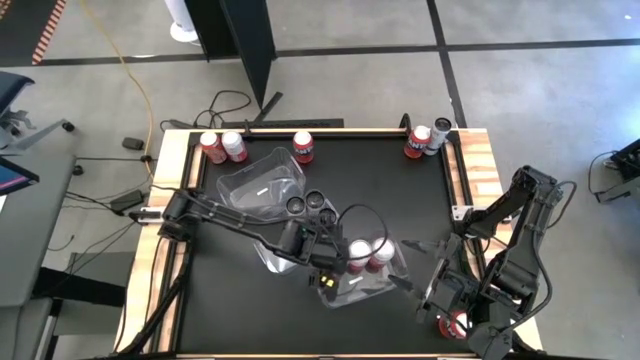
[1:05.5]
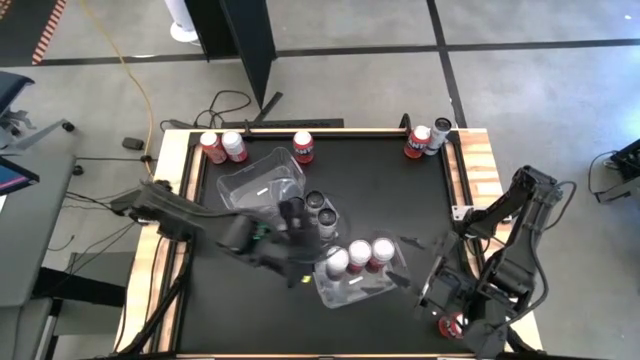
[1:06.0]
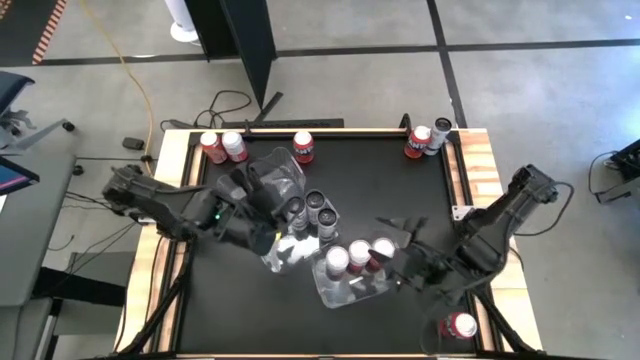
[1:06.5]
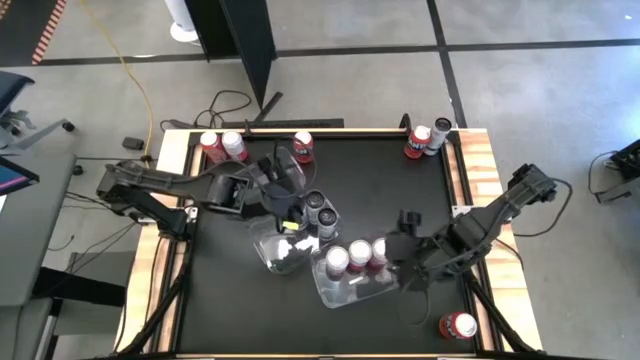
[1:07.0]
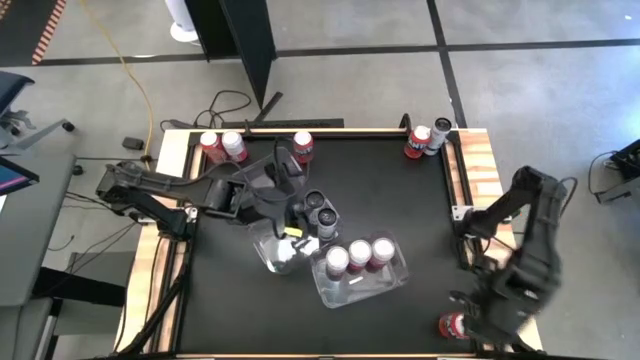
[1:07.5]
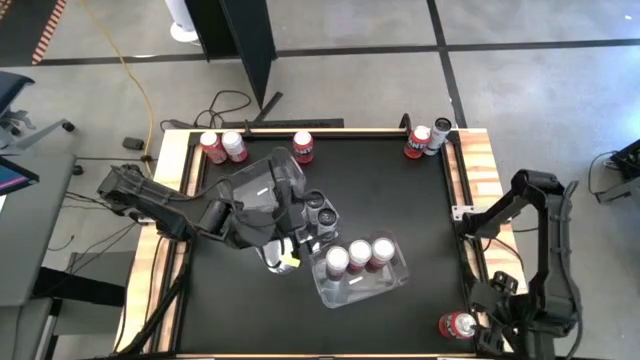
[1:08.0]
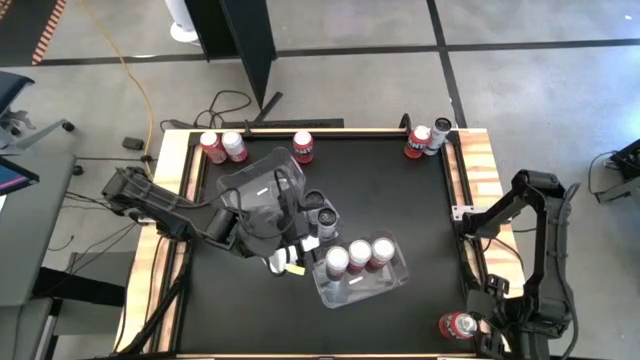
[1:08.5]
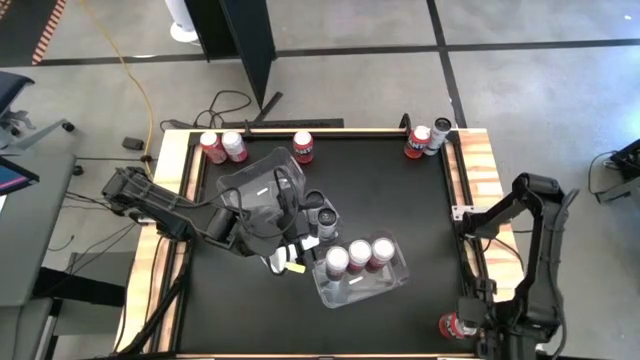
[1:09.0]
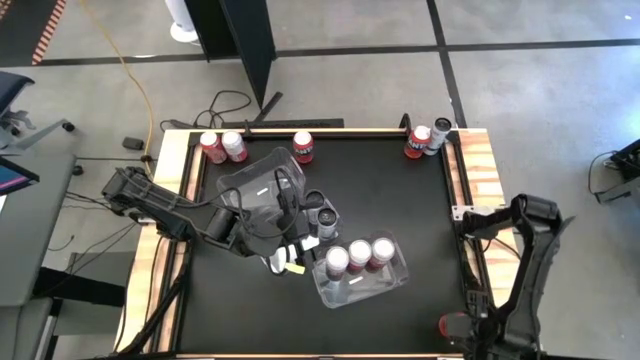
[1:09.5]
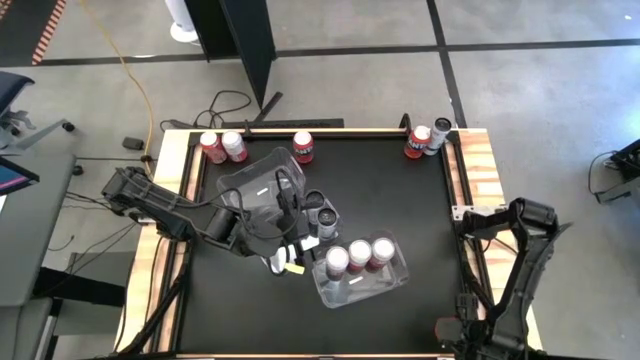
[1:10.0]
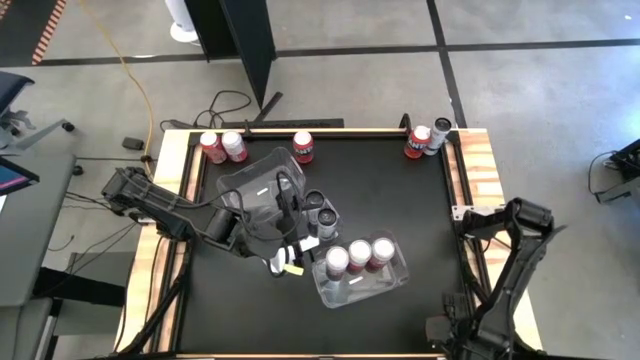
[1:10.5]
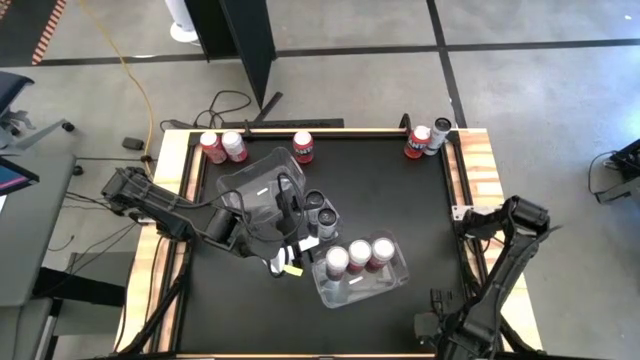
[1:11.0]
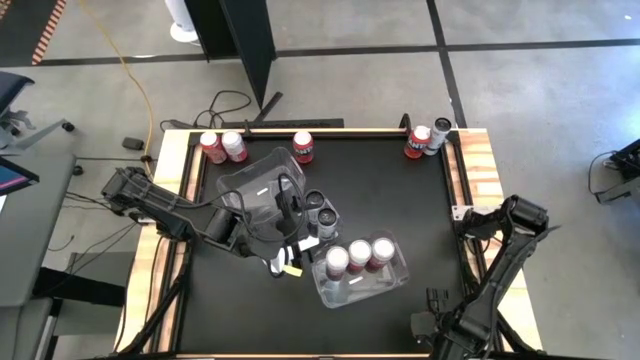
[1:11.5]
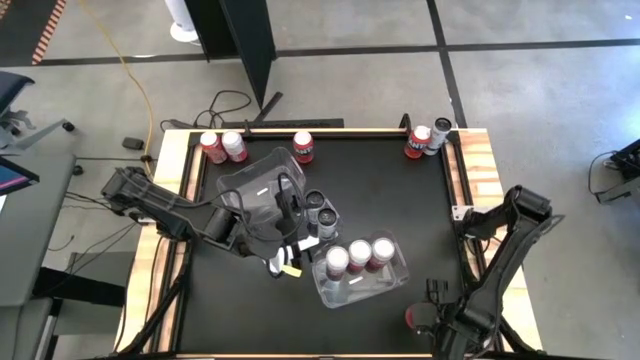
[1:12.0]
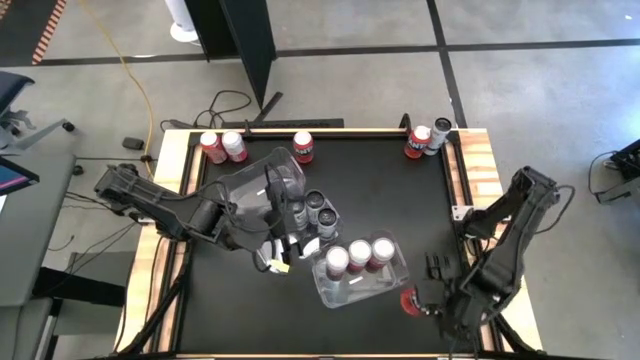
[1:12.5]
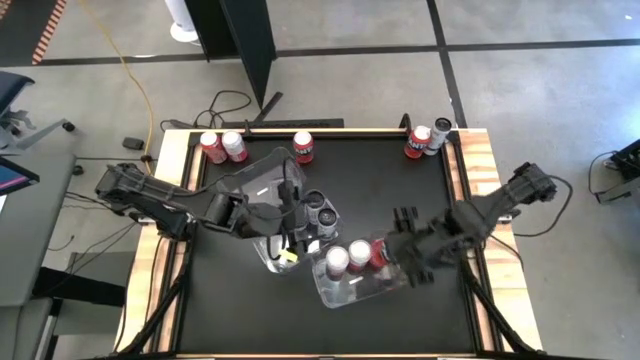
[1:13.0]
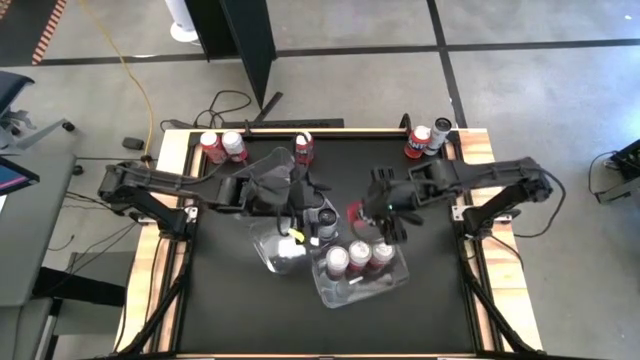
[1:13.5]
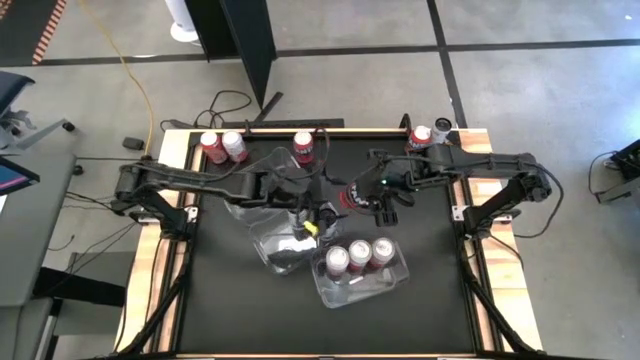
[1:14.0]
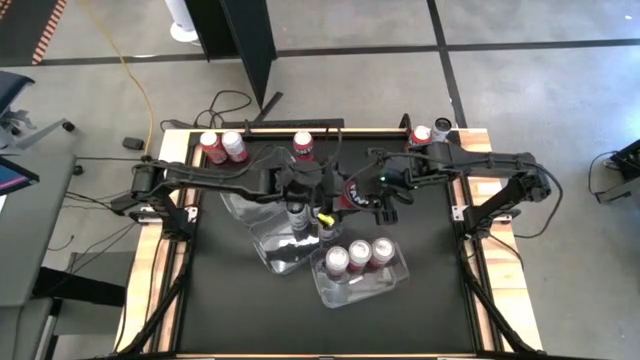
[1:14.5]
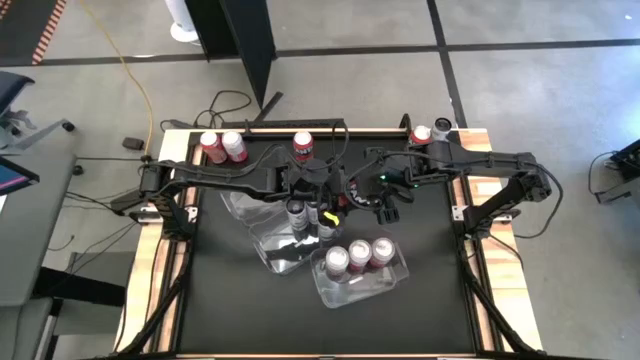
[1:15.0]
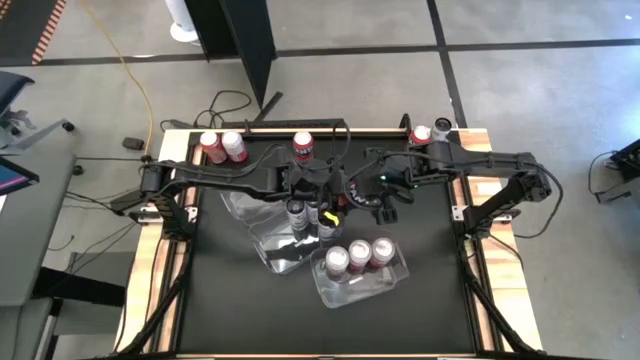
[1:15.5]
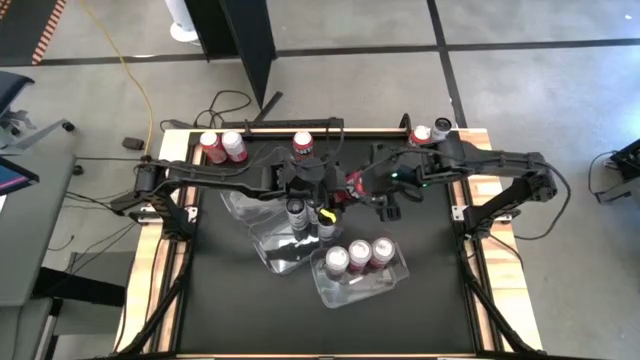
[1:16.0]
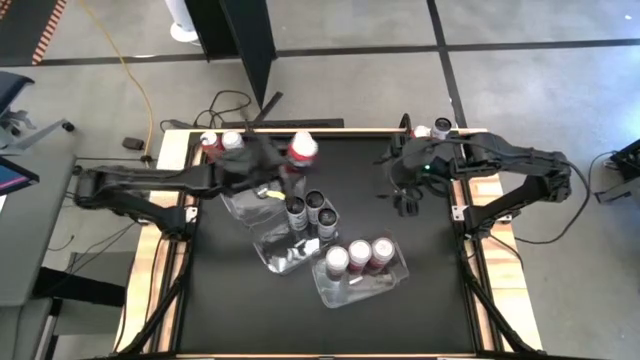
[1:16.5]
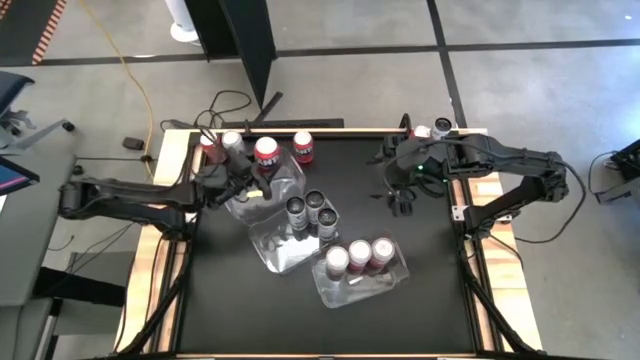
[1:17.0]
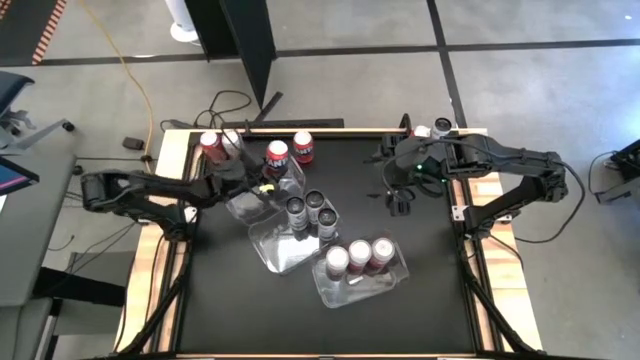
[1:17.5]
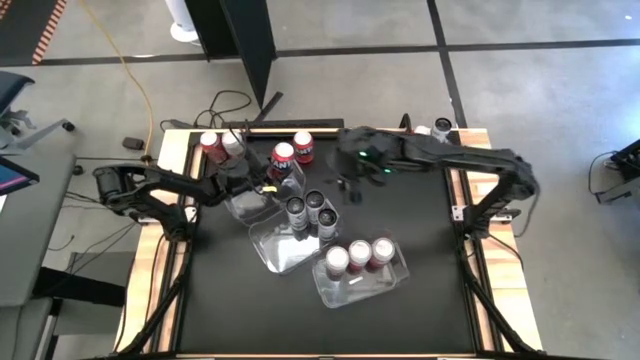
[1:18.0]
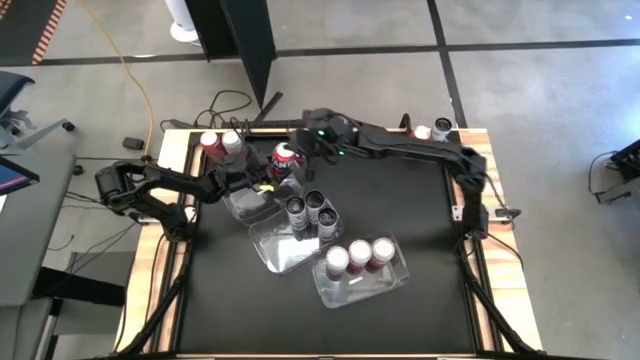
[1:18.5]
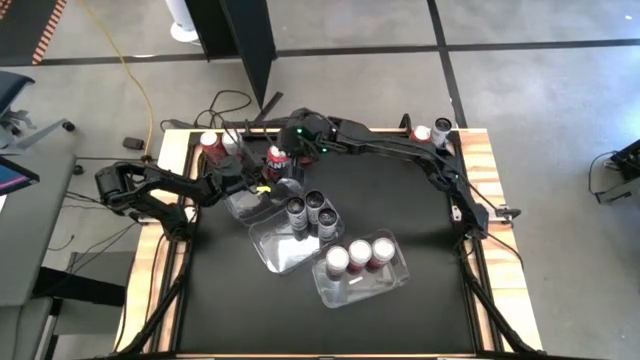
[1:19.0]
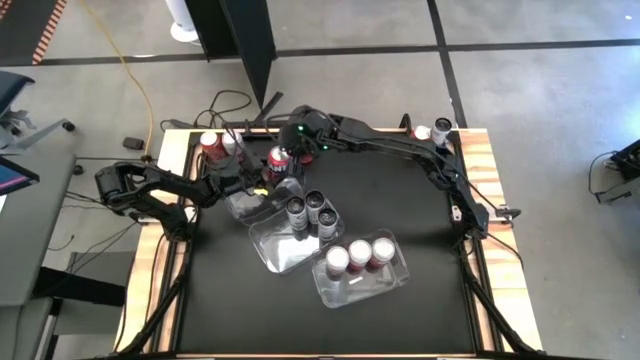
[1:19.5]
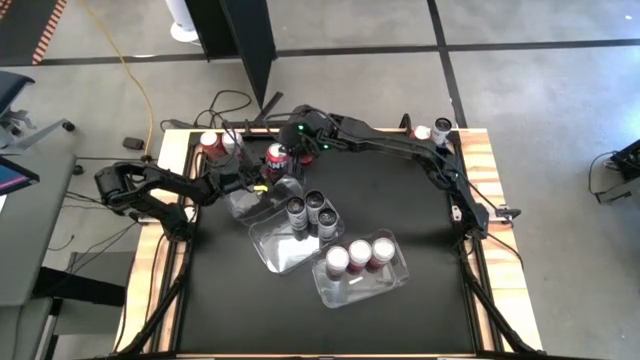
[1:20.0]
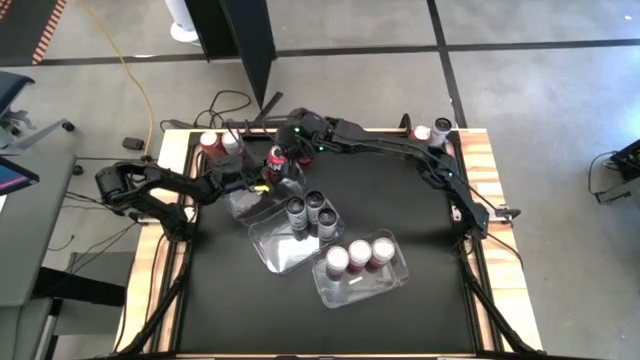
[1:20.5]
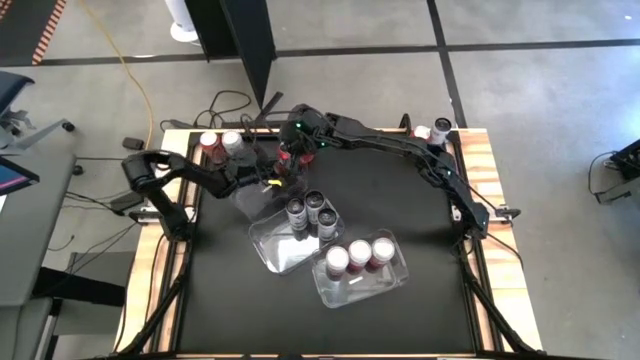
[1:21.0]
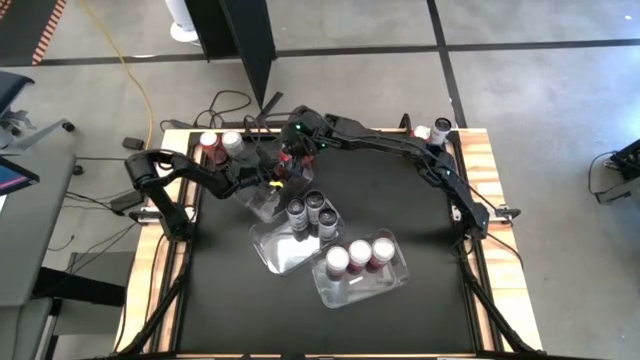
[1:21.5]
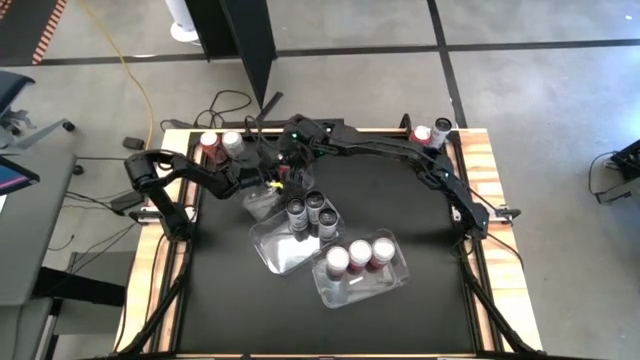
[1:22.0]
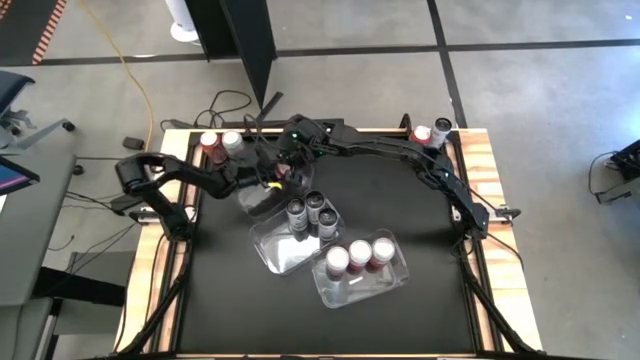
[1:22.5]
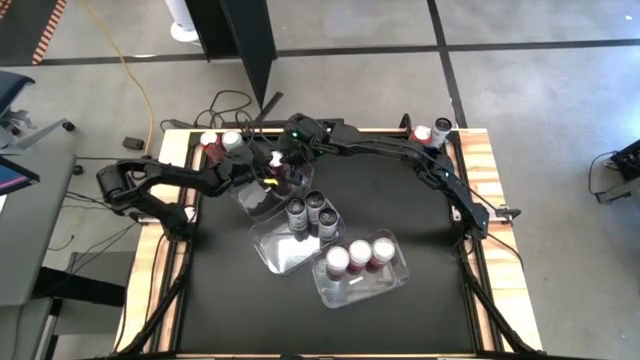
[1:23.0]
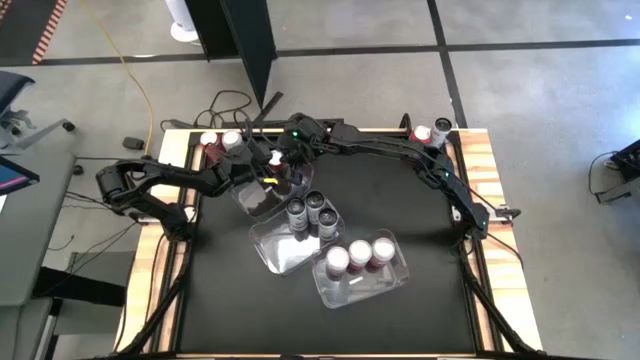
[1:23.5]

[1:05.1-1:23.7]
Task: Sort soda cans
Put the bottom right orange soda can in the top left transparent bin

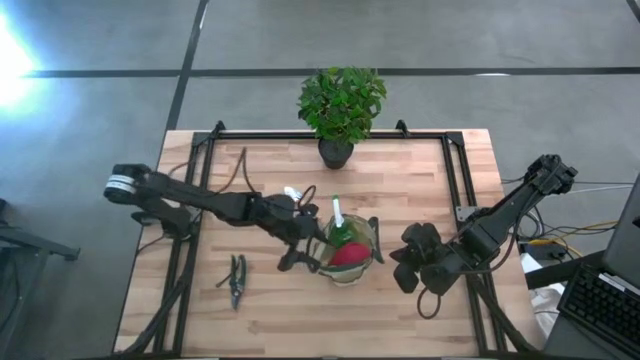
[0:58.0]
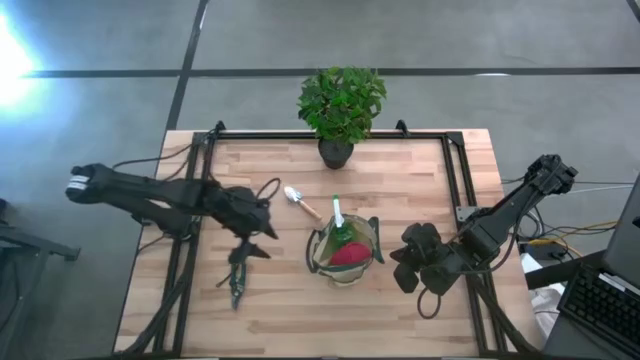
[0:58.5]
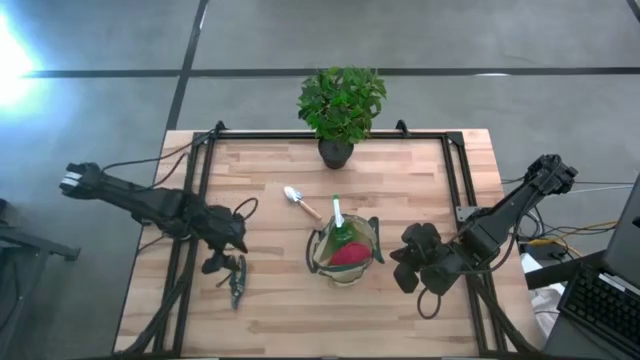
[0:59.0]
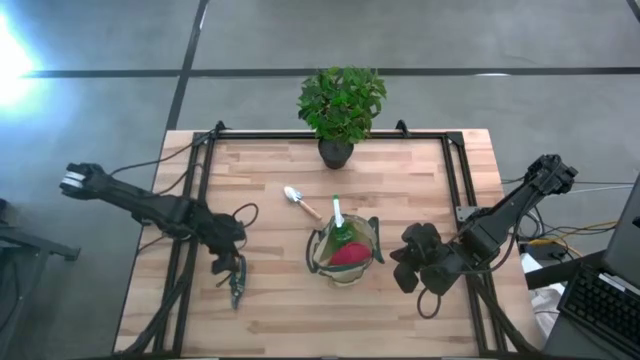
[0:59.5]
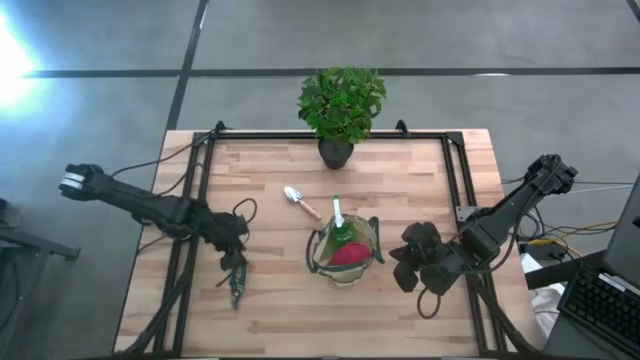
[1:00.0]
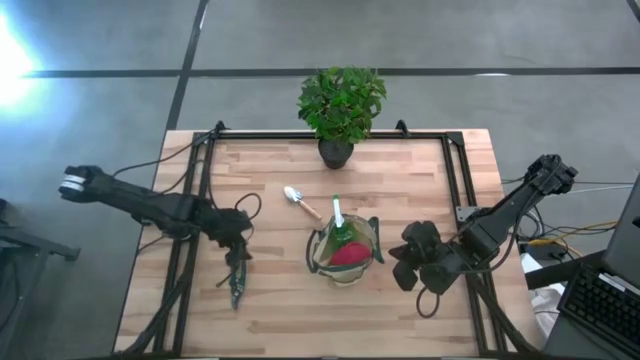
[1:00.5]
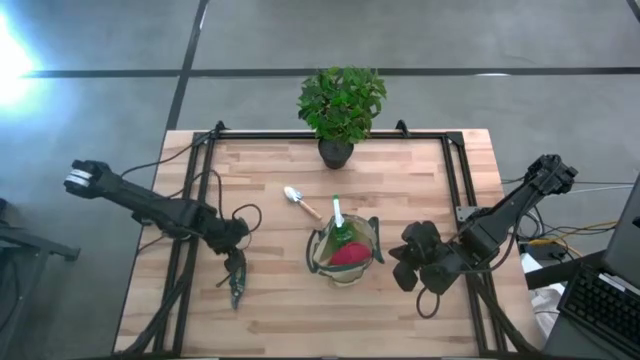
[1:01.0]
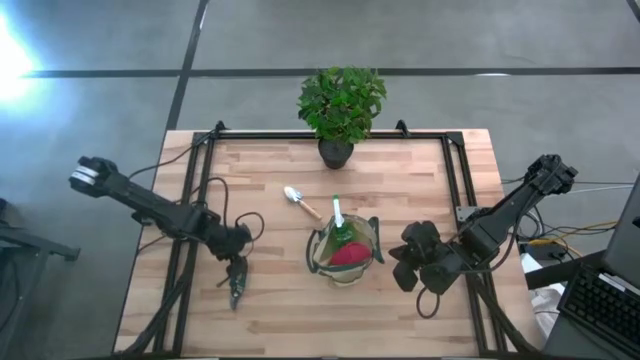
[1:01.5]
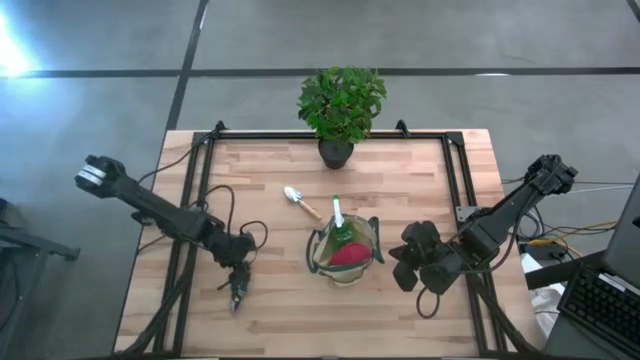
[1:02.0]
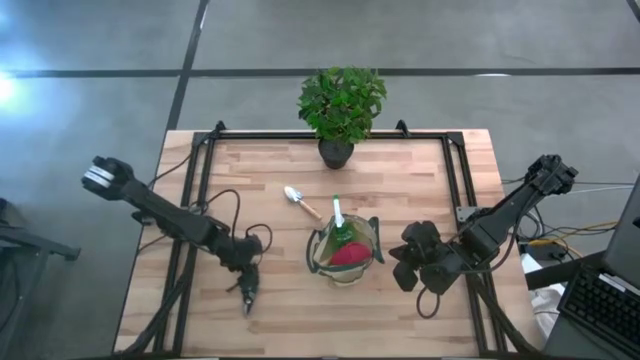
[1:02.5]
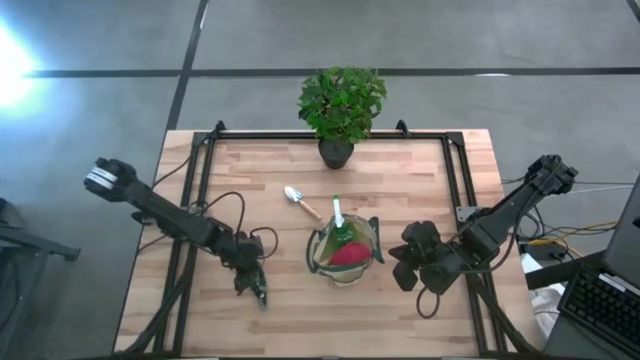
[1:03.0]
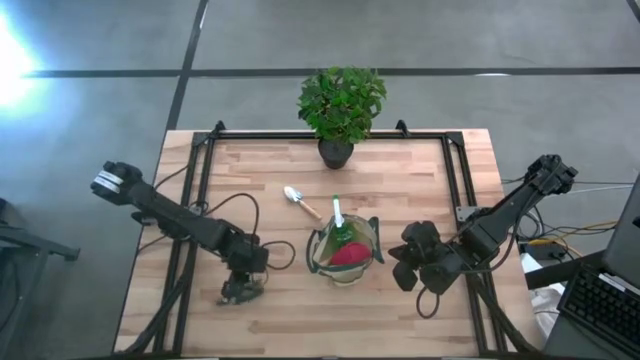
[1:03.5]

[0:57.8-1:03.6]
Task: Pick & Place Garden tools in Gardening bag
Put the green shear scissors into the gardening bag
